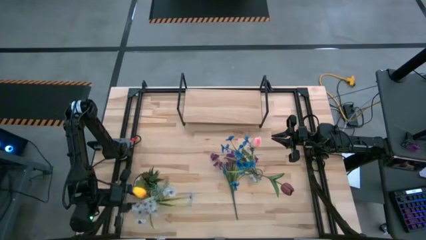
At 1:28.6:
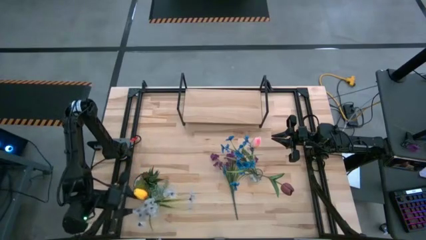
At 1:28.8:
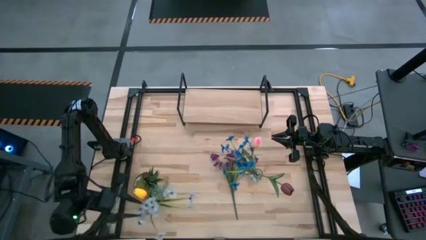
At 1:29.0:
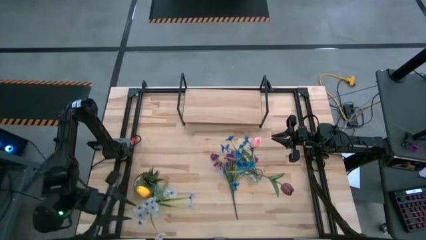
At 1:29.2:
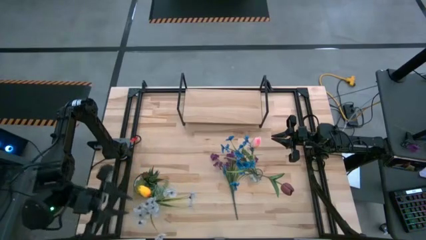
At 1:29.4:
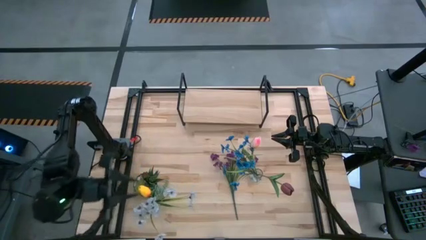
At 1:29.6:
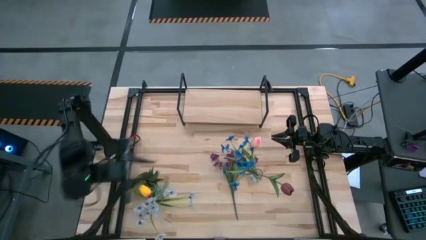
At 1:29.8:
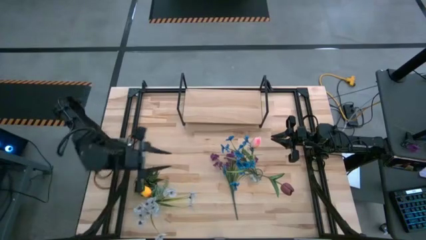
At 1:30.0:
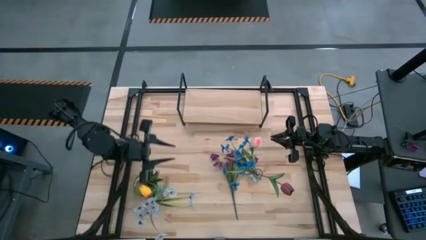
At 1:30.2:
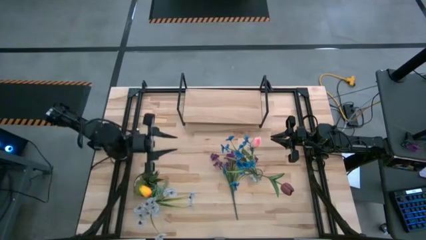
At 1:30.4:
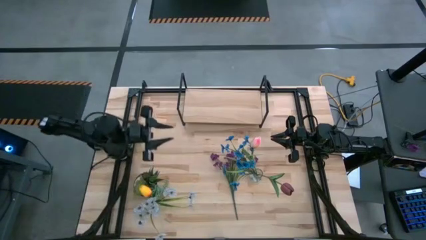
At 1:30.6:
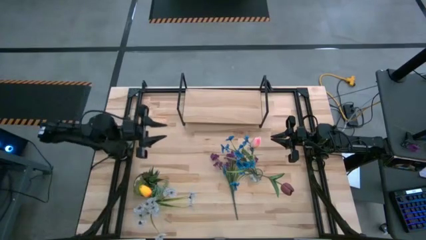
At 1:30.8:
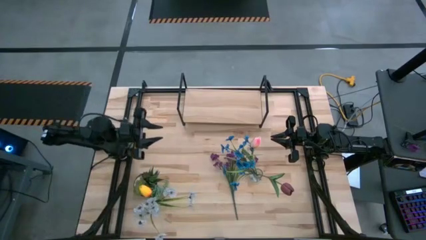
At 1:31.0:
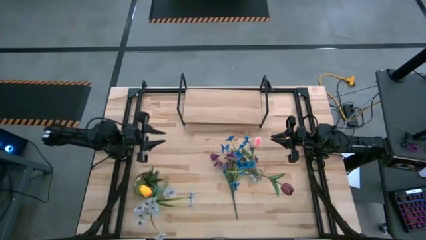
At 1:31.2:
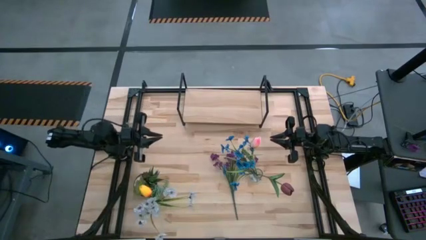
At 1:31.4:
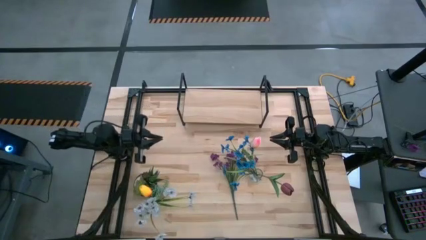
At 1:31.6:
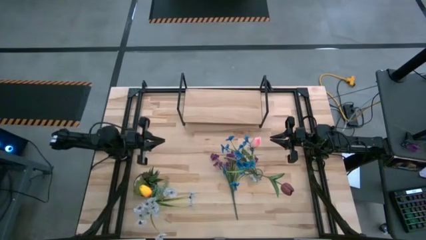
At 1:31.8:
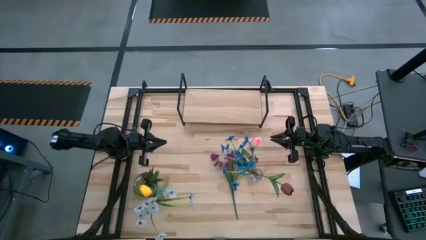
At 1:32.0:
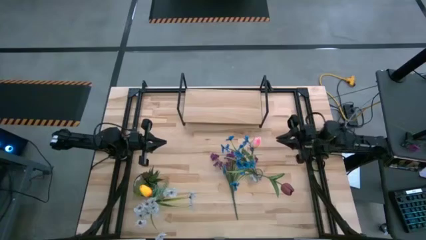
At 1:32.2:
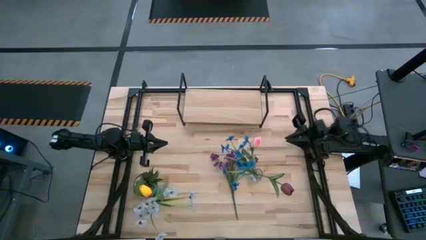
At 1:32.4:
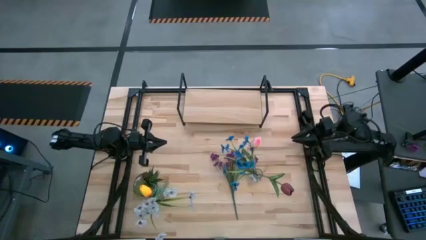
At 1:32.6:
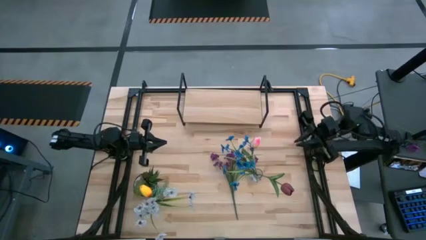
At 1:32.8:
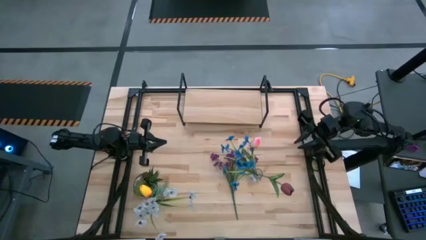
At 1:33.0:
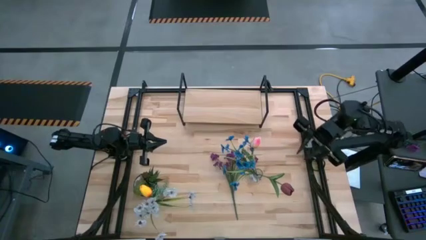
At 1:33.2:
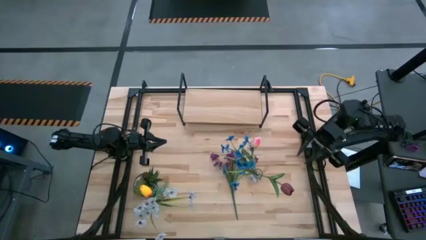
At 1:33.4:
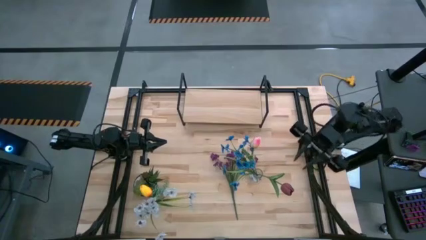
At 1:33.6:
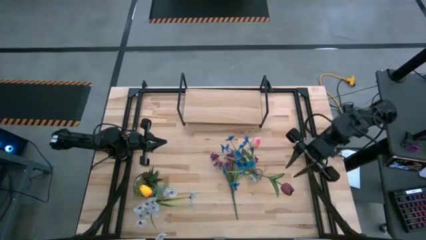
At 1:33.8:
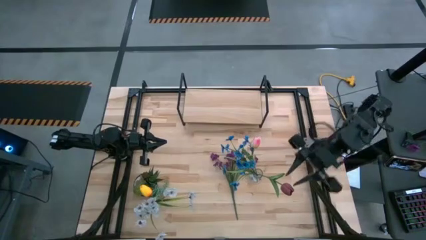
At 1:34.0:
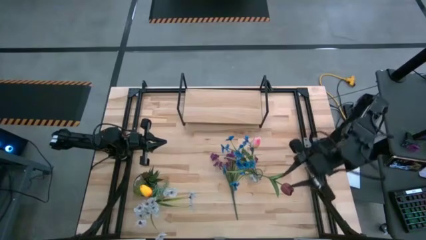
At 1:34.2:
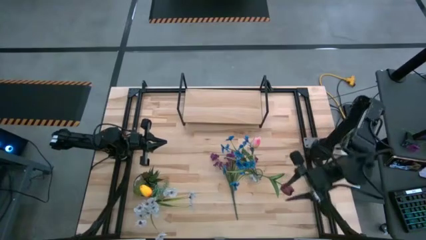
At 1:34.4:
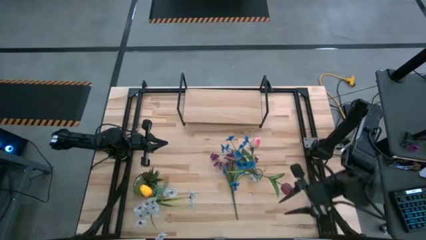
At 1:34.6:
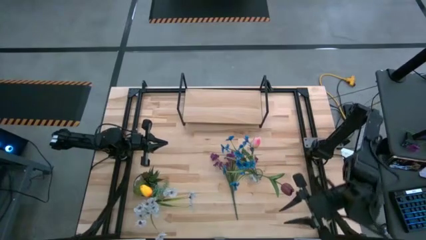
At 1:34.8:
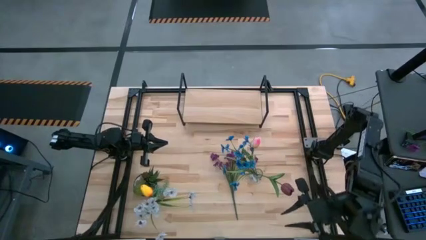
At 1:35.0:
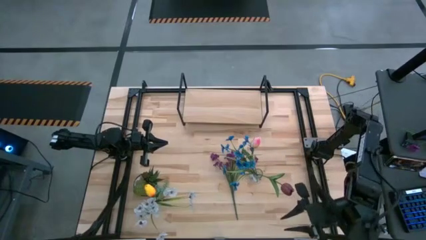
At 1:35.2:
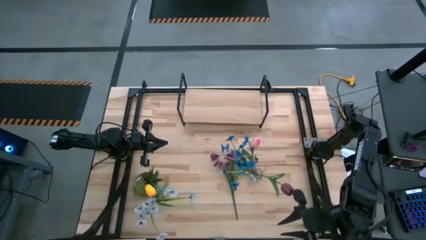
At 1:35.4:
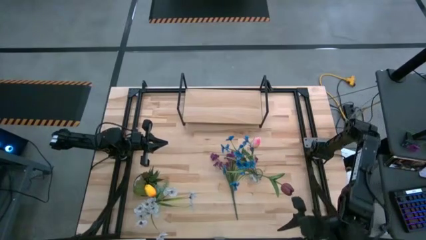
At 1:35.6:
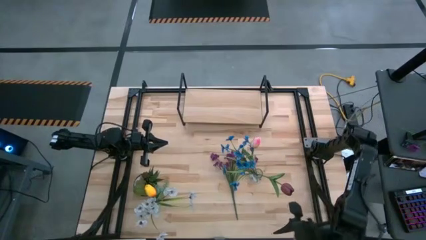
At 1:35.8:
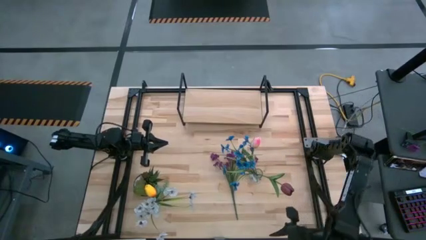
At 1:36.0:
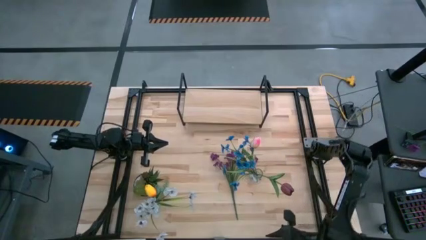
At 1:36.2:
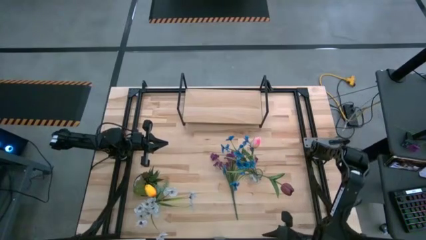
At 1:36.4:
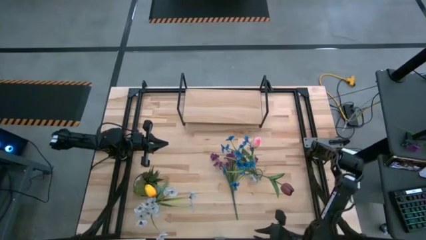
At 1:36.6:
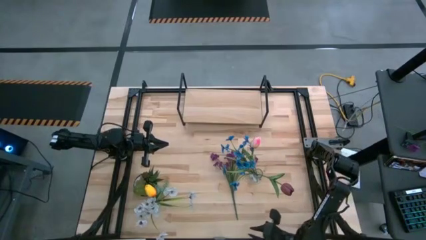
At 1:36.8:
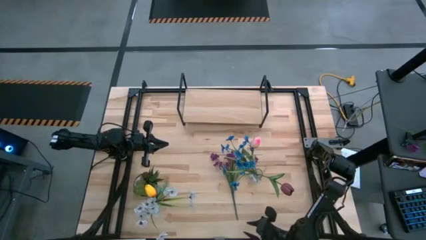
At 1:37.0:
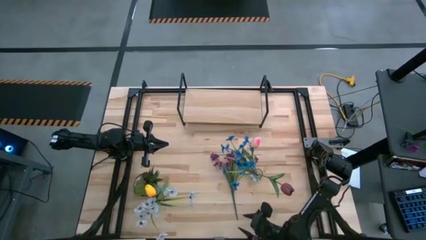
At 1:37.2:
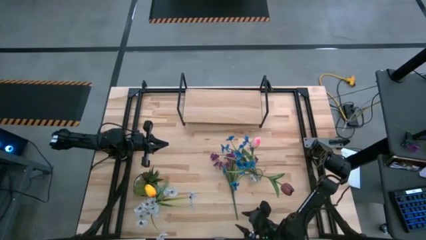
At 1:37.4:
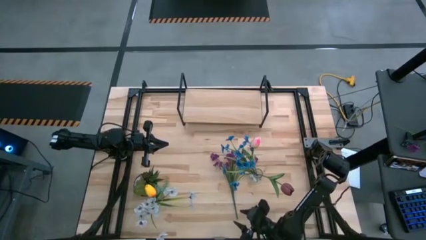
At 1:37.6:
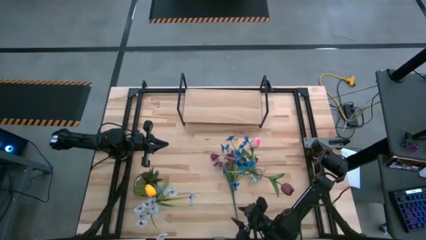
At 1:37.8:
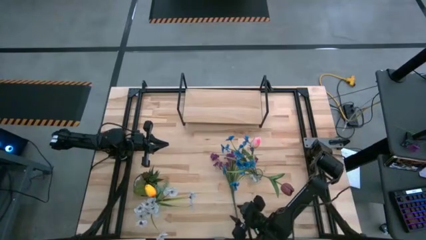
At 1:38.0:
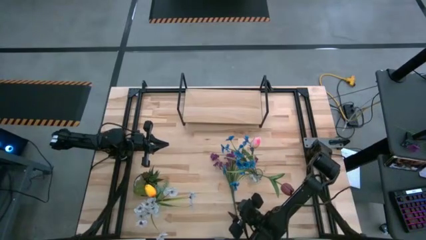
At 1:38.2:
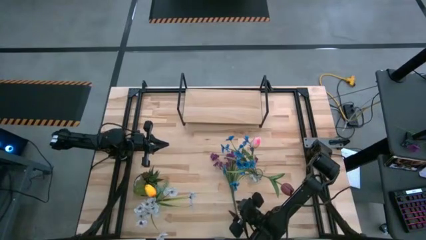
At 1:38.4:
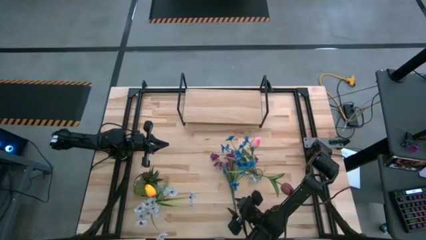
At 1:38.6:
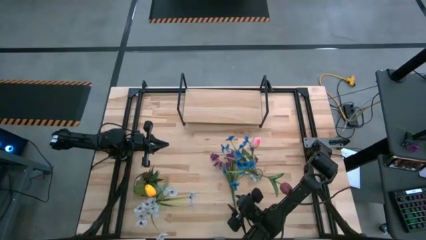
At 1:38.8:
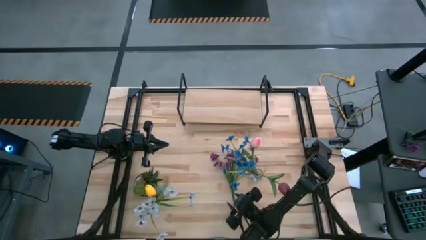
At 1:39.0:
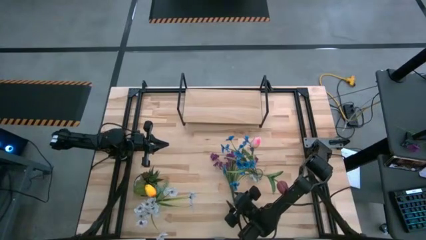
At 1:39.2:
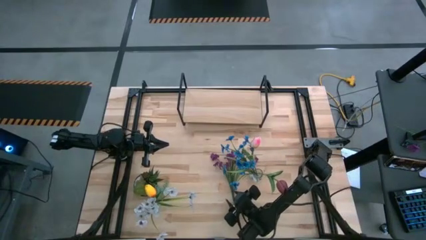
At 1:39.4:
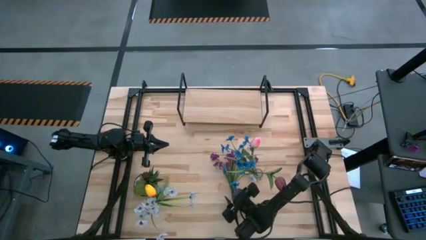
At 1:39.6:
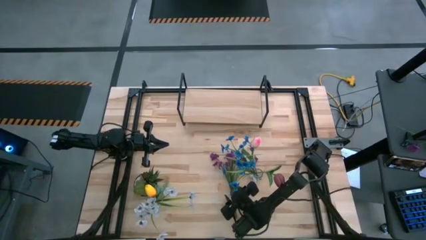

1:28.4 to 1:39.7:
Task: Pick and place flowers into a vace then onto a shelf
Put the purple flowers into the right transparent vase

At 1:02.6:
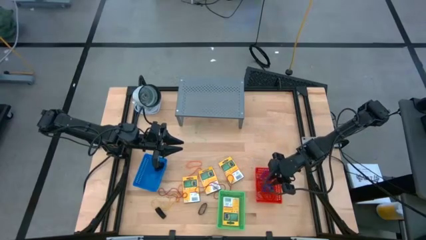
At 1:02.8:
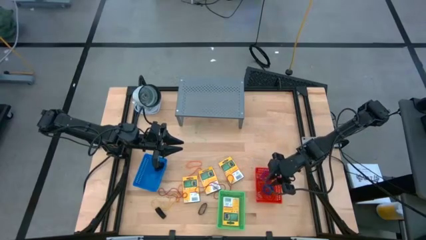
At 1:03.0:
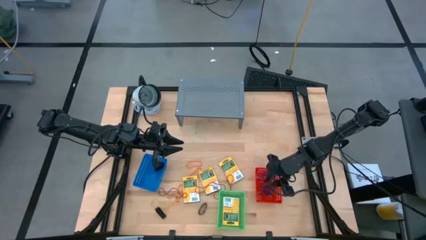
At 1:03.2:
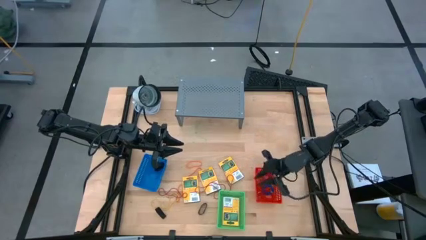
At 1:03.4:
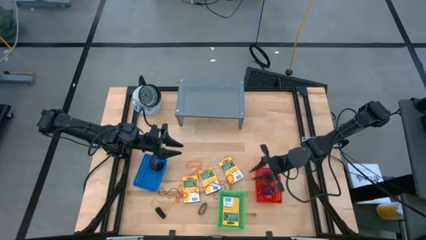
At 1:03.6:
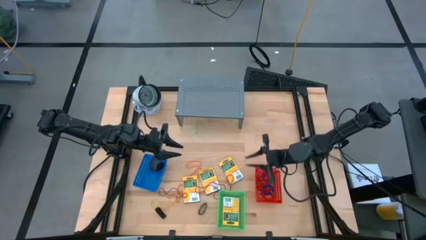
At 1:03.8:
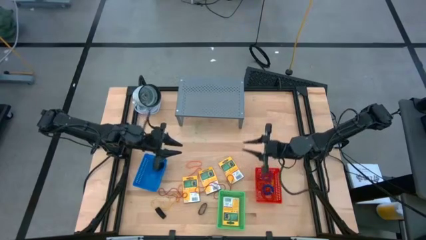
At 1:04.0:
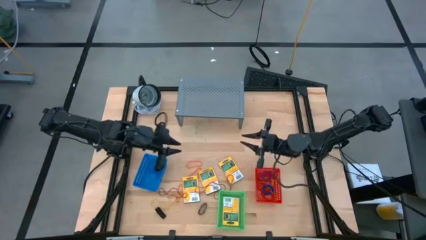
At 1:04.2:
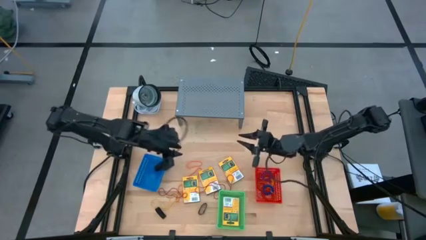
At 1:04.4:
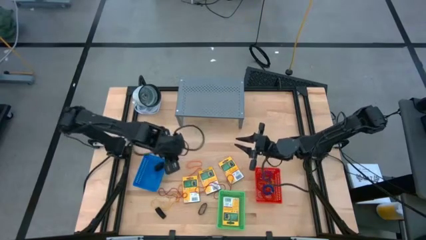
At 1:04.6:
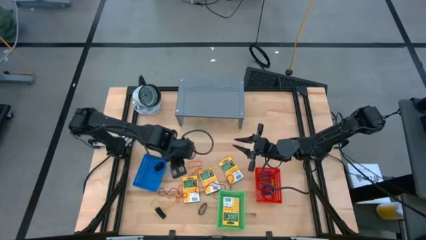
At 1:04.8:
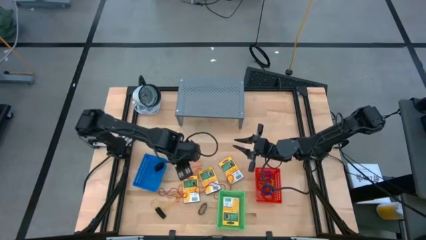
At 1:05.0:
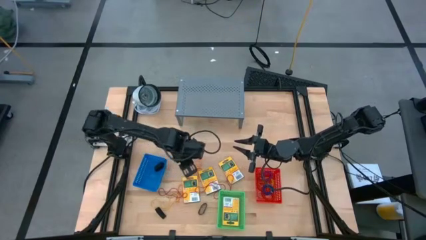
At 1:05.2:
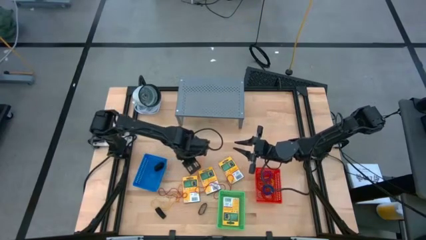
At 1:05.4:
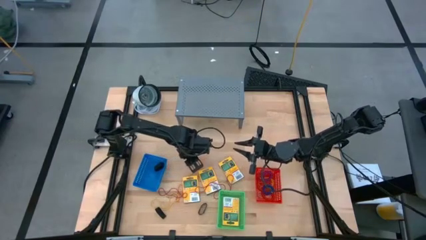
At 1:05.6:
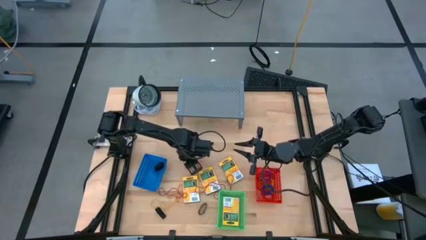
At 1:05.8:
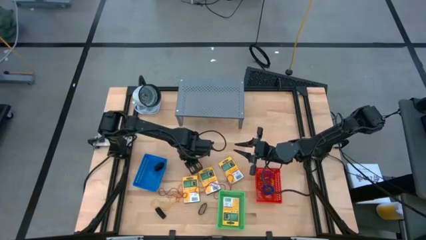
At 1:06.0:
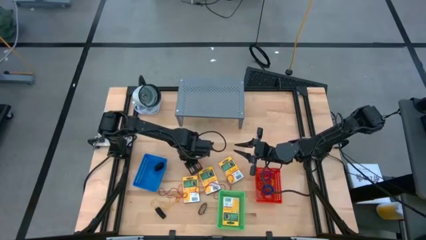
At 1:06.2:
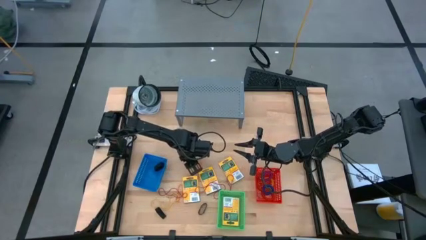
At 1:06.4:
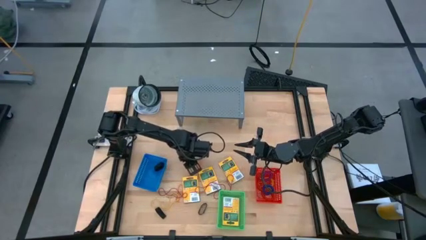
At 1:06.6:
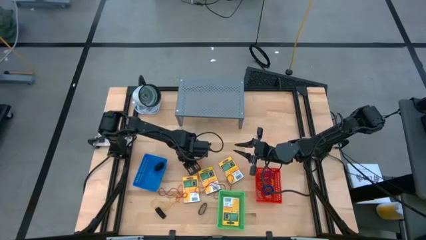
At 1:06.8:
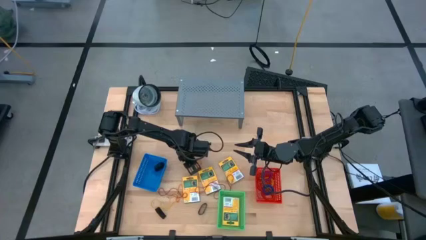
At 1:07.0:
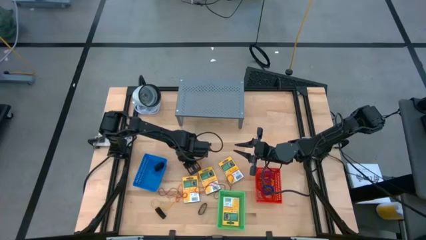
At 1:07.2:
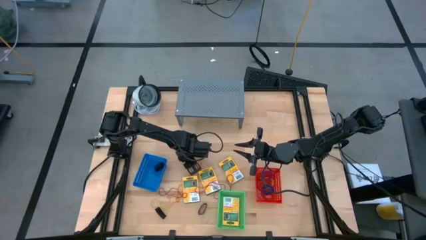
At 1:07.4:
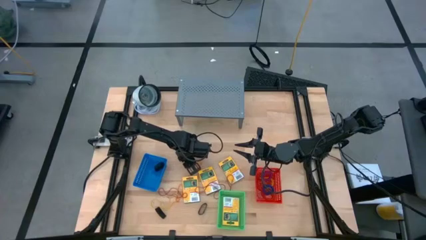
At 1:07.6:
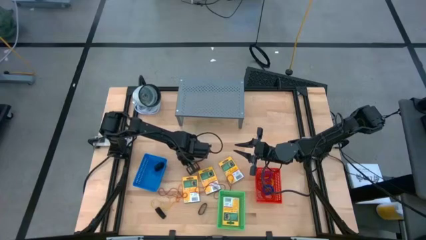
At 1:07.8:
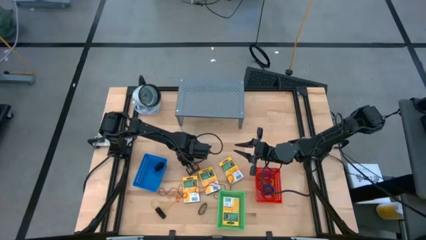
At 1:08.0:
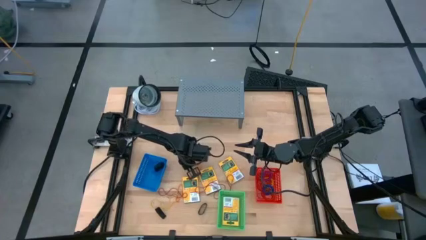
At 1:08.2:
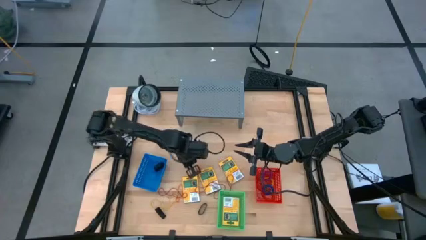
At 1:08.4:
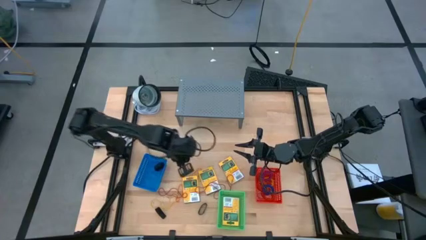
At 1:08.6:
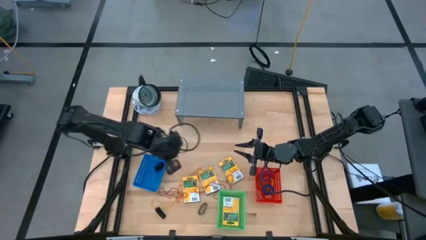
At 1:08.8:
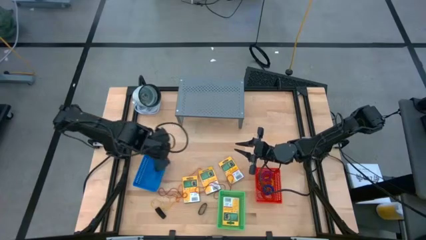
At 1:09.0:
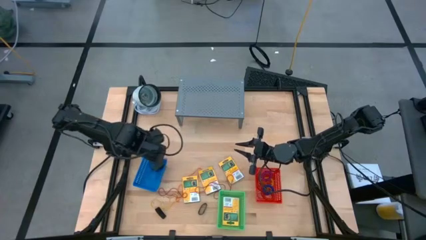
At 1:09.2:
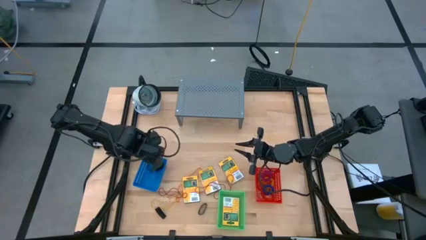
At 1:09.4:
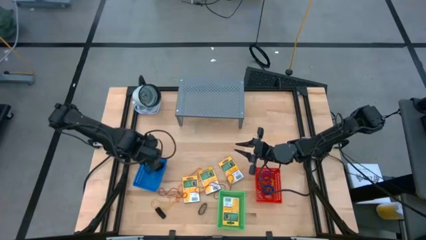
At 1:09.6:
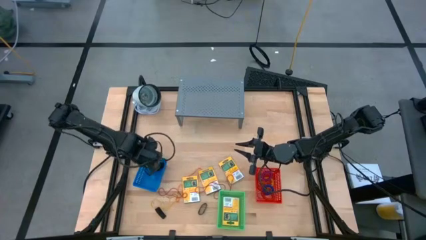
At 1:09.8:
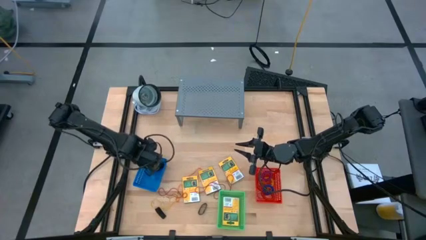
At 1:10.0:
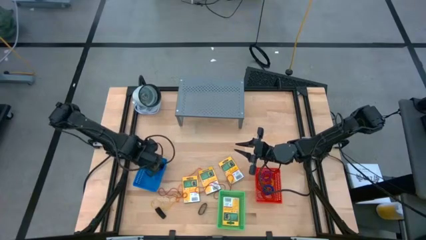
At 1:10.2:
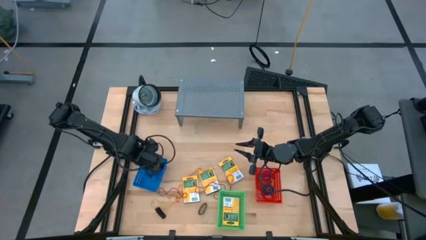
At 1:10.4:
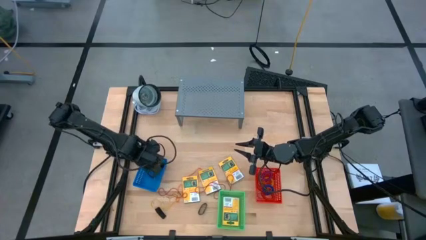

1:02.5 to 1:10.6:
Task: Pick & Place Office Desk Supplies
Put the orange rubber band into the blue bin
